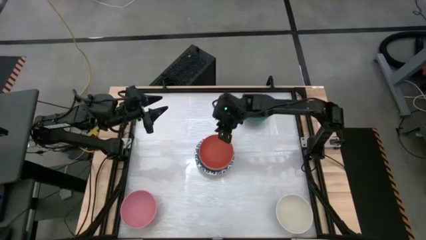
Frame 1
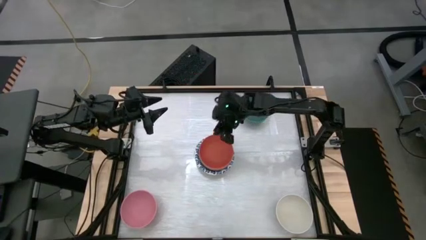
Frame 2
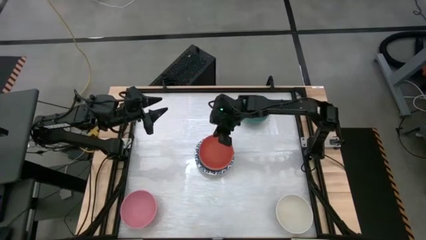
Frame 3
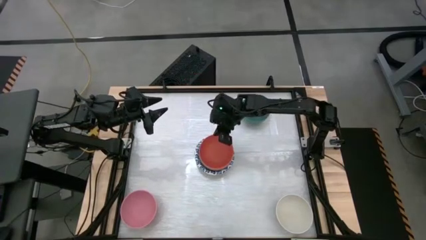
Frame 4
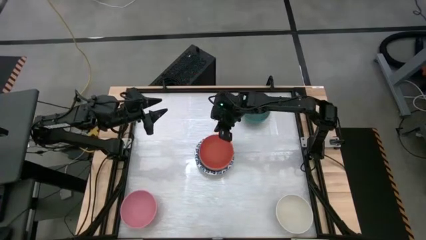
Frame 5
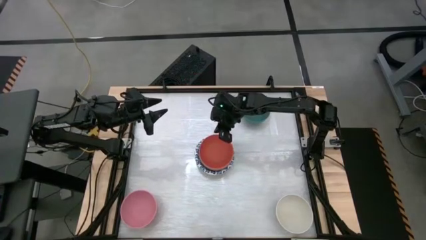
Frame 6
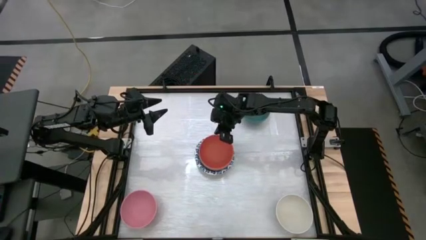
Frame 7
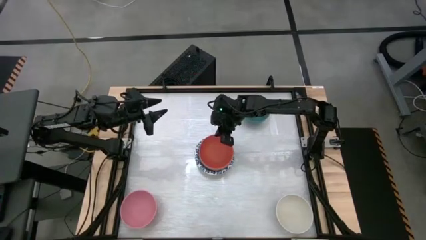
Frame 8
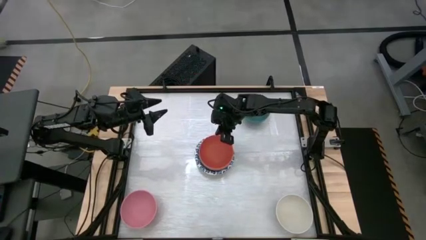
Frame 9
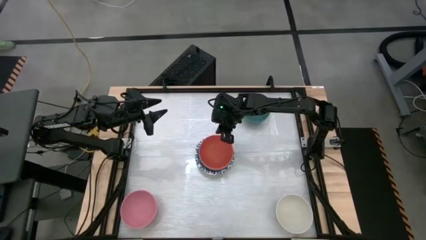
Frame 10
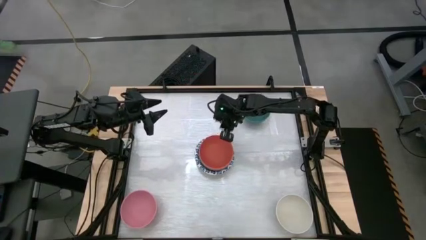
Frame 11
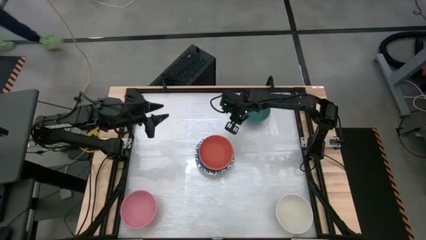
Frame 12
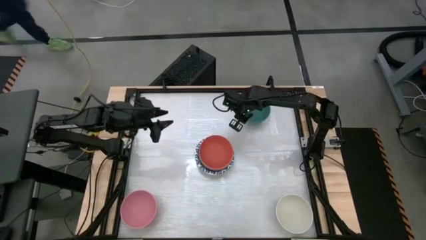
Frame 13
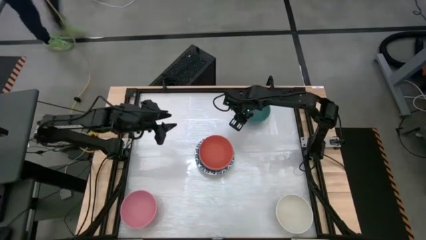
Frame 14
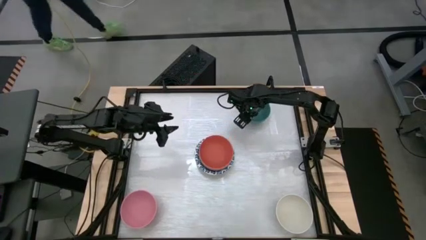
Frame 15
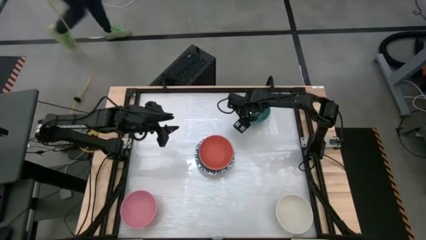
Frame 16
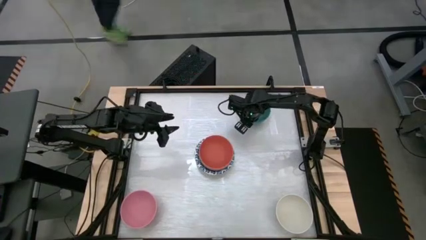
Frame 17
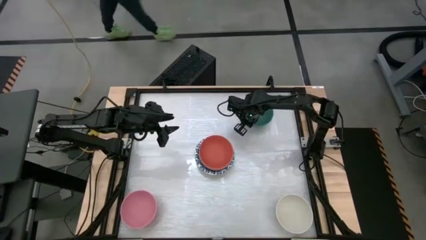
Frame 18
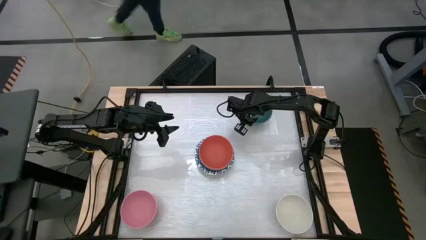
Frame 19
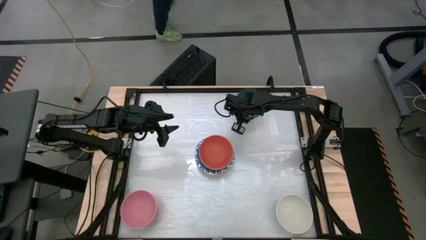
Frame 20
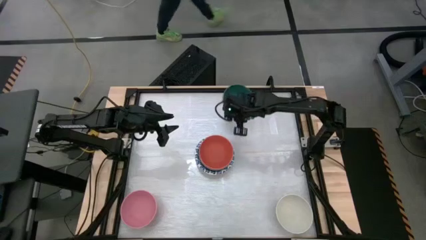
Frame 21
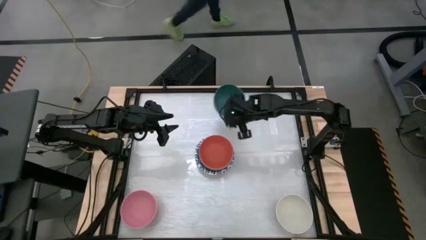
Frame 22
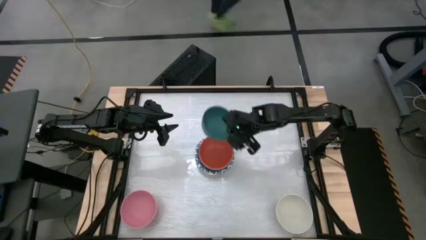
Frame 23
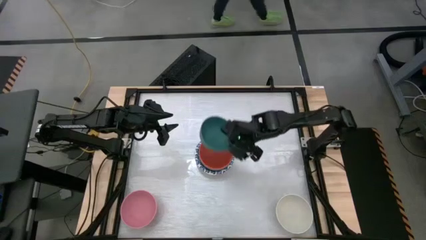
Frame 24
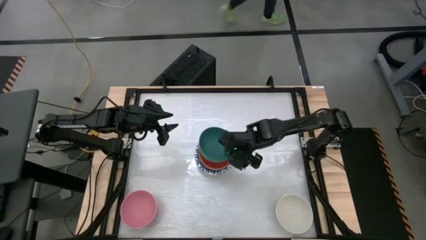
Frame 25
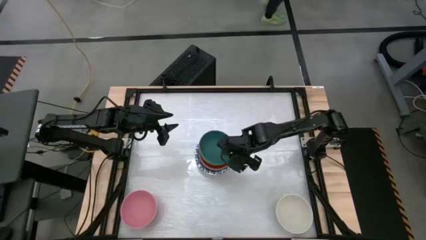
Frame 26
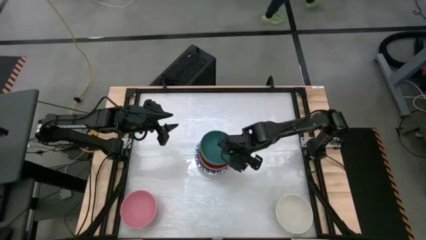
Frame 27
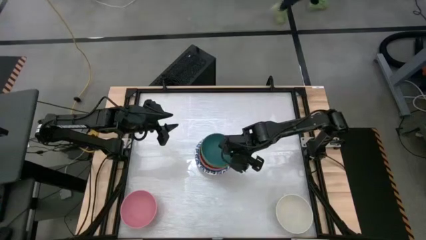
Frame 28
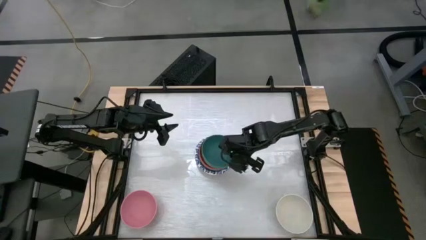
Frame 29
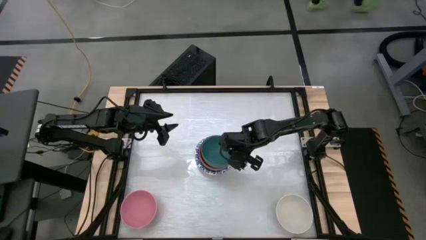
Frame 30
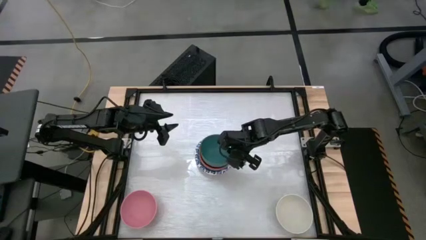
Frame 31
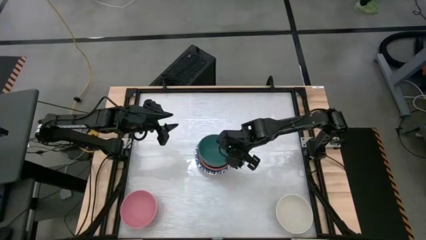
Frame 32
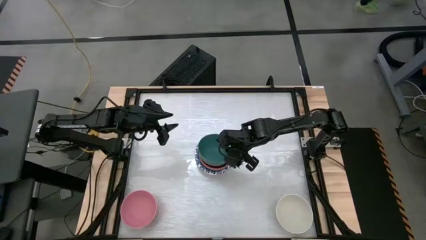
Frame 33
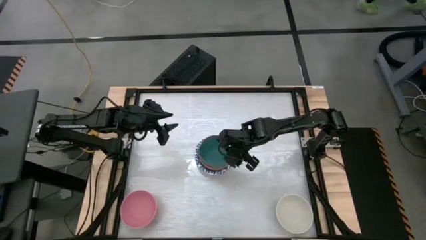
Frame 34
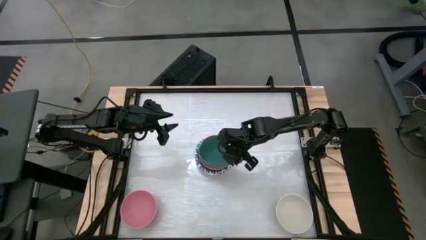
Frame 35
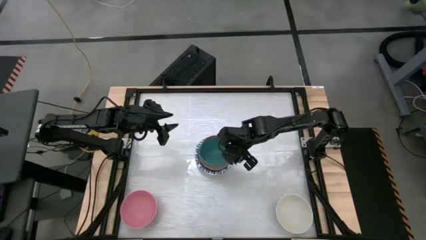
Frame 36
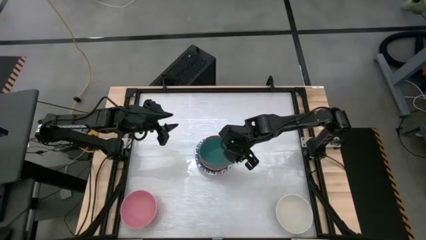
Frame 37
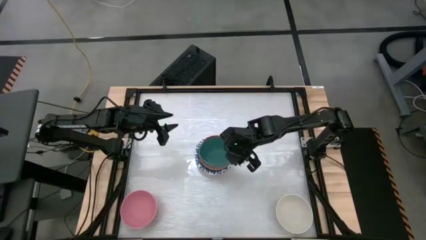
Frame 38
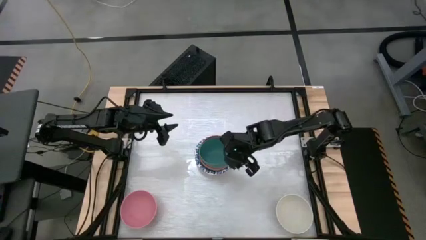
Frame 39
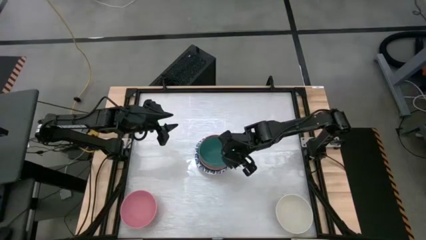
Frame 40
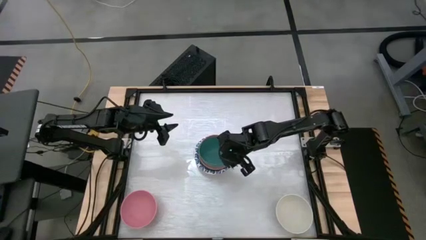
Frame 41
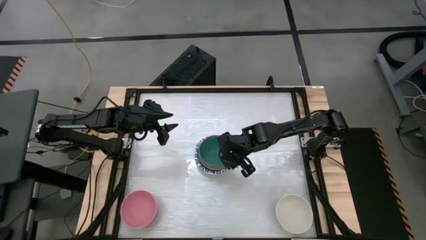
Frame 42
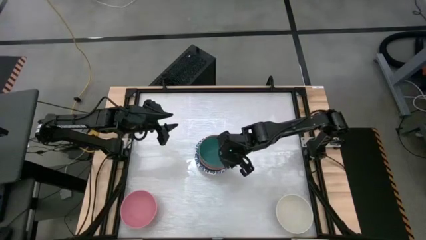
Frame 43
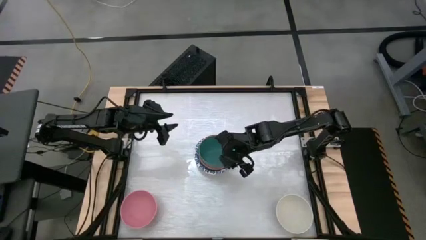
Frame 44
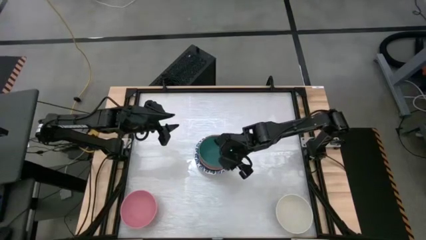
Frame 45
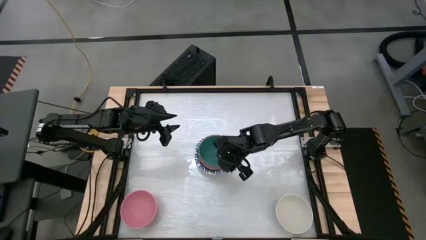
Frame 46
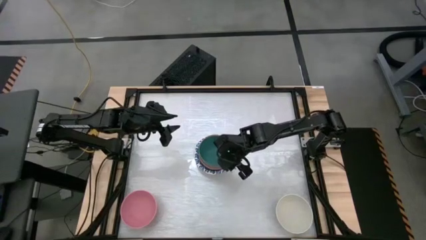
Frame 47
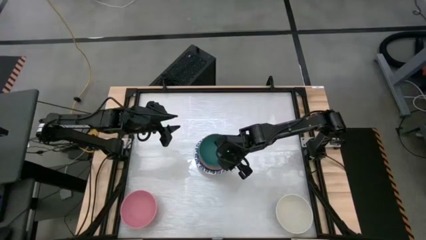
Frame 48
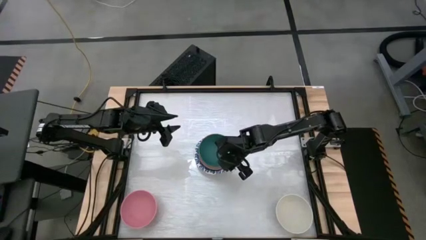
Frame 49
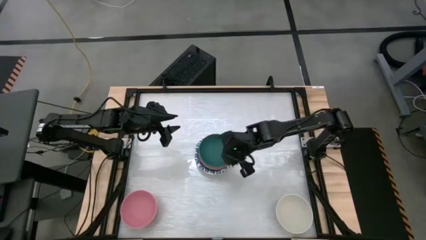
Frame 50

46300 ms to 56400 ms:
Stack the green bowl on top of the orange bowl

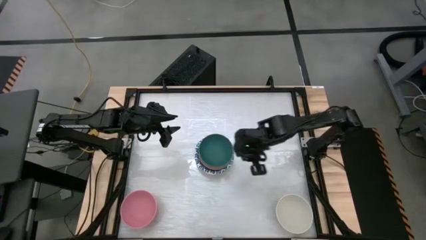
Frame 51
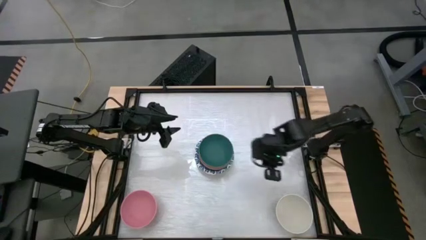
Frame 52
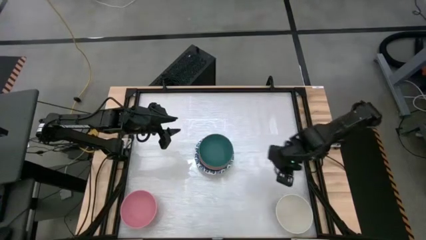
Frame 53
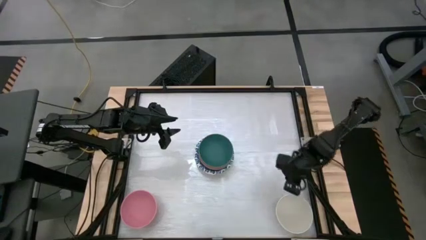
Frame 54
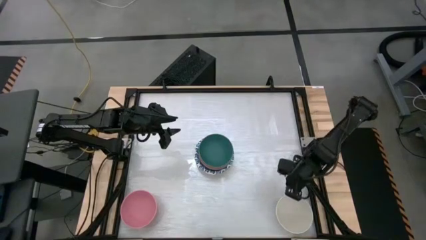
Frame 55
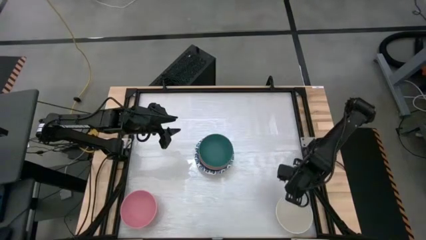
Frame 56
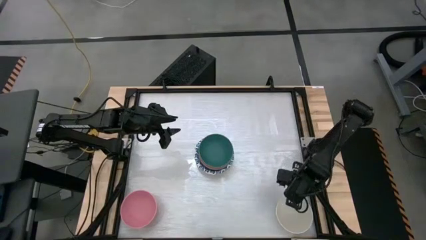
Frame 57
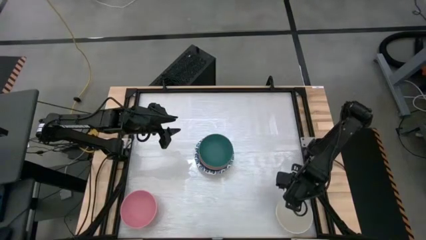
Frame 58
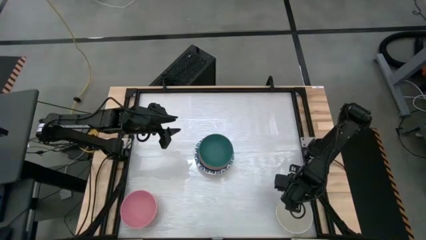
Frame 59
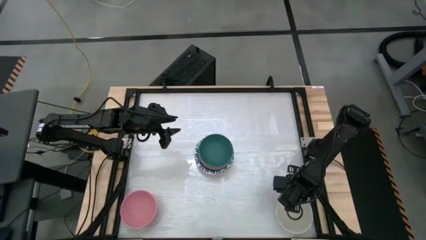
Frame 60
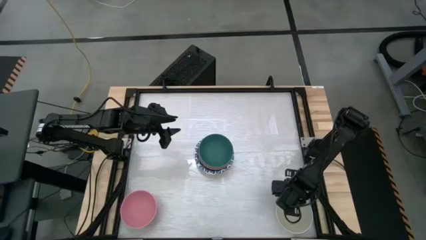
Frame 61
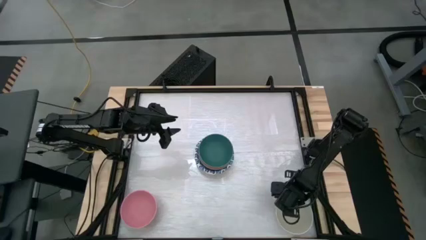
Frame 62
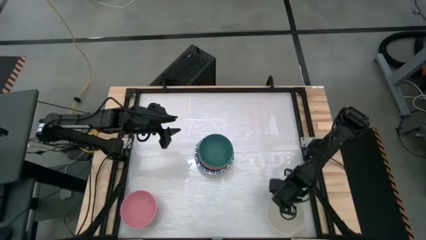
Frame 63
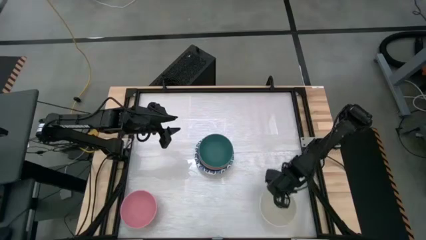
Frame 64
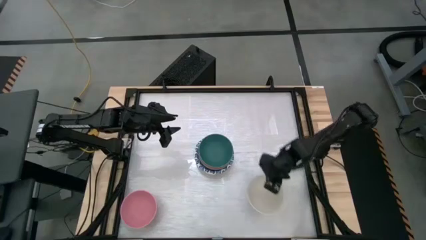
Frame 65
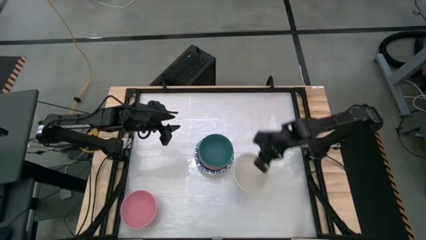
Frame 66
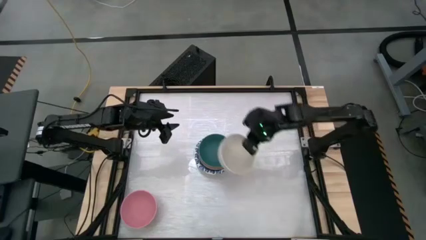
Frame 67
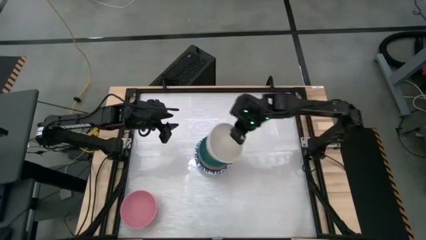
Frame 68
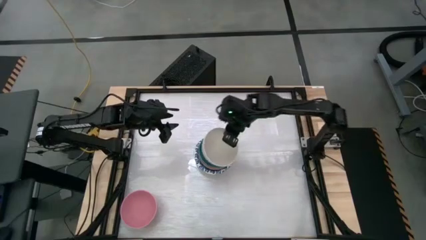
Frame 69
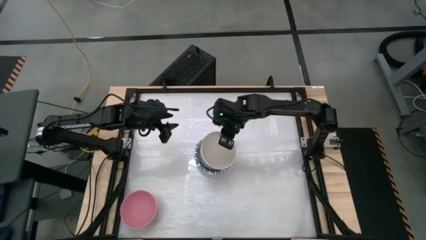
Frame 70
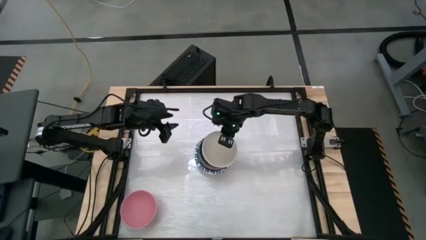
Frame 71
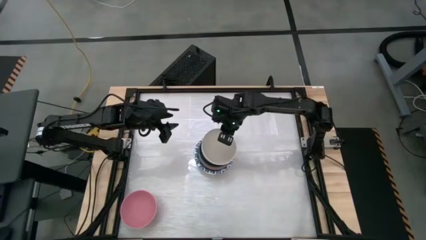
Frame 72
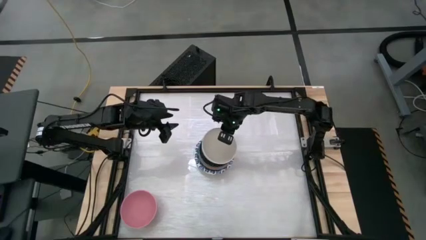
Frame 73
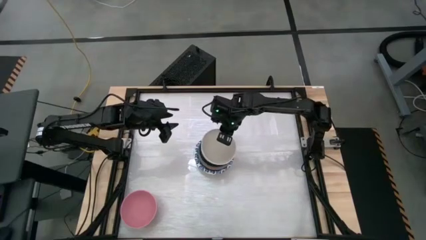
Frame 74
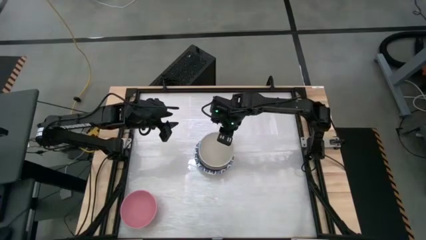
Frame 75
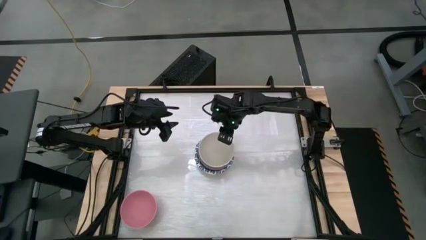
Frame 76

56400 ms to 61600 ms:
Stack the white bowl on top of the green bowl
